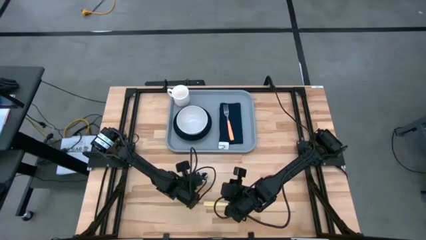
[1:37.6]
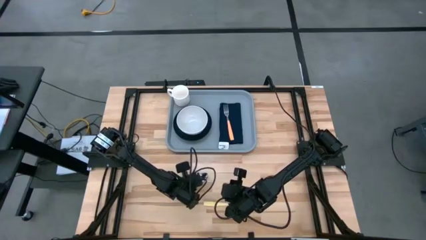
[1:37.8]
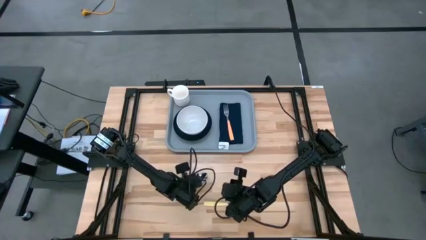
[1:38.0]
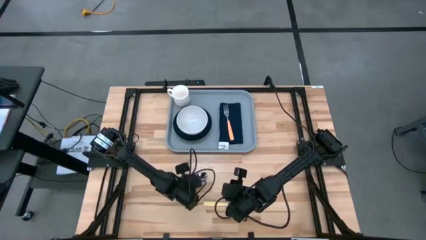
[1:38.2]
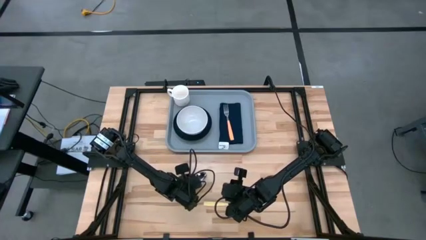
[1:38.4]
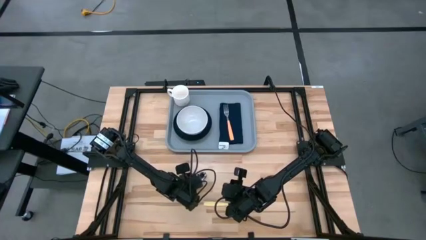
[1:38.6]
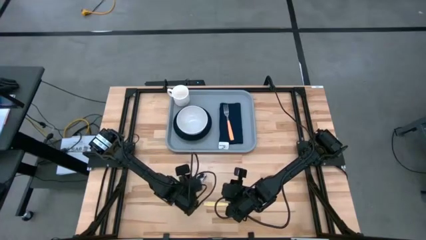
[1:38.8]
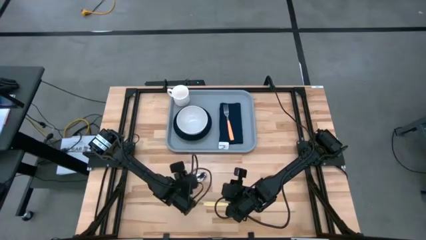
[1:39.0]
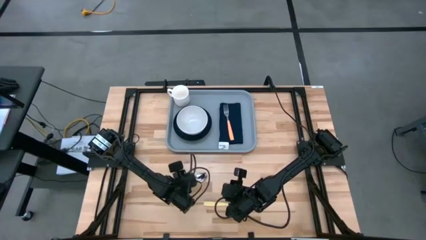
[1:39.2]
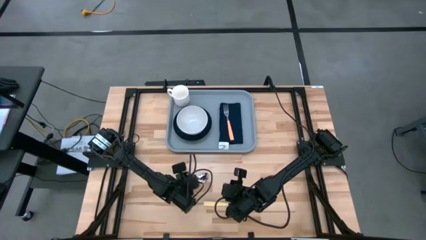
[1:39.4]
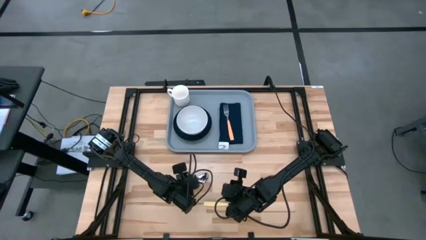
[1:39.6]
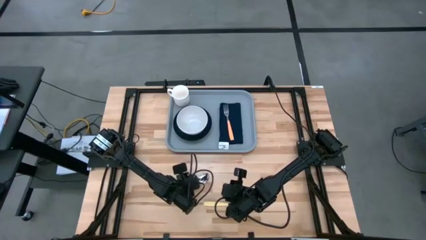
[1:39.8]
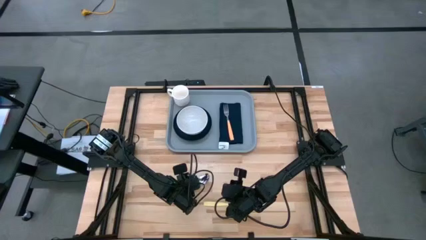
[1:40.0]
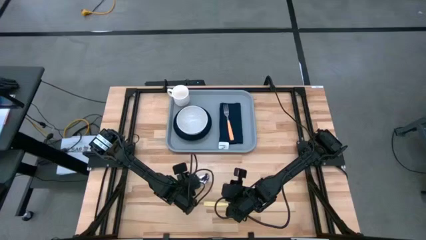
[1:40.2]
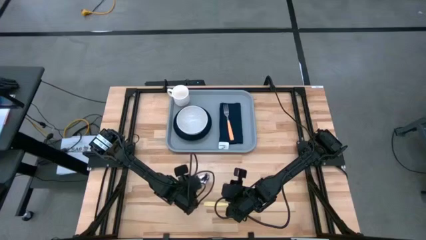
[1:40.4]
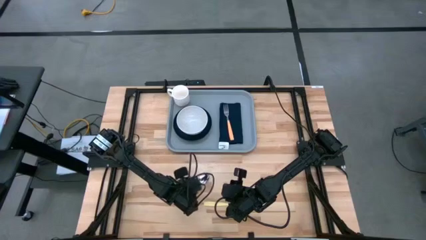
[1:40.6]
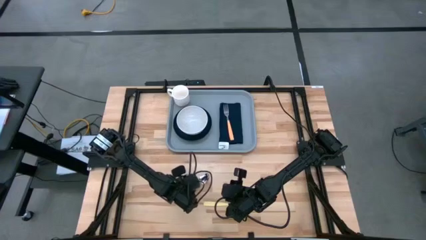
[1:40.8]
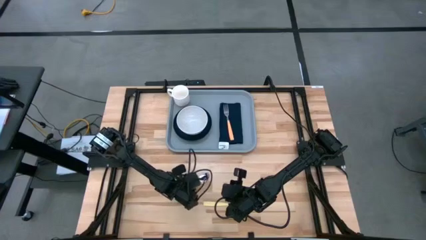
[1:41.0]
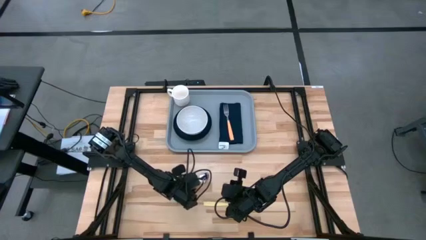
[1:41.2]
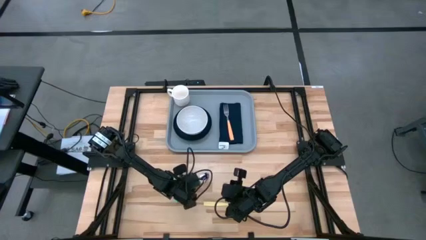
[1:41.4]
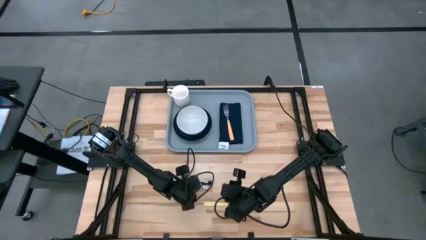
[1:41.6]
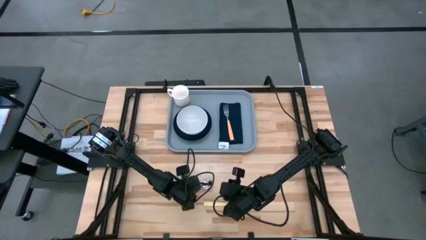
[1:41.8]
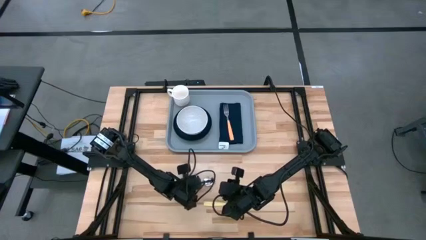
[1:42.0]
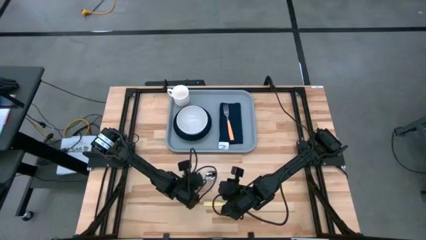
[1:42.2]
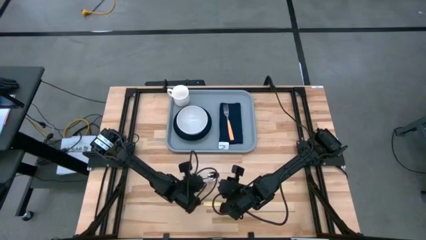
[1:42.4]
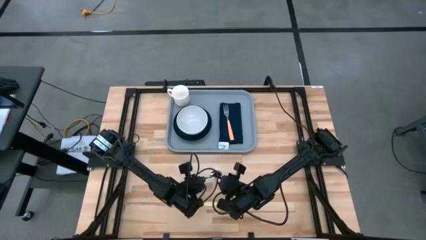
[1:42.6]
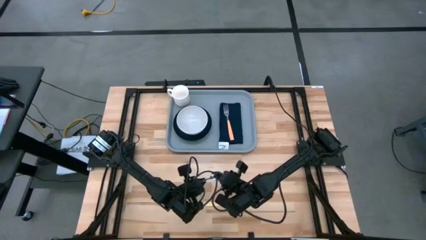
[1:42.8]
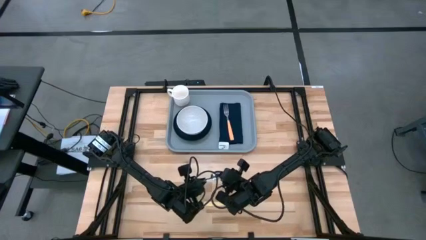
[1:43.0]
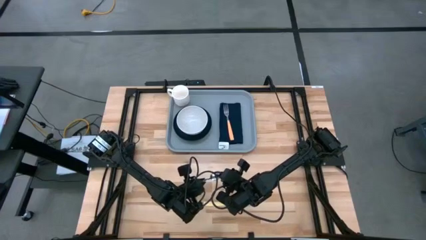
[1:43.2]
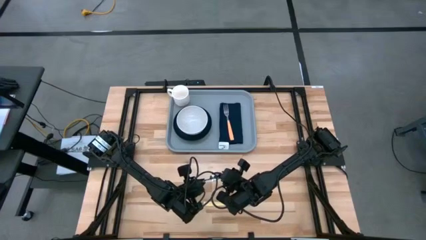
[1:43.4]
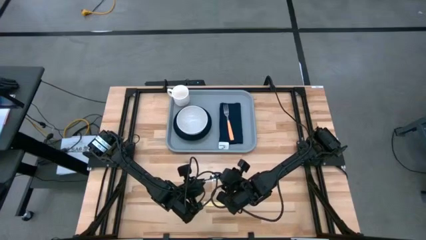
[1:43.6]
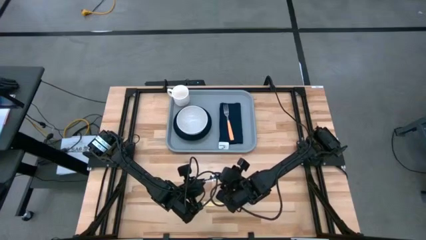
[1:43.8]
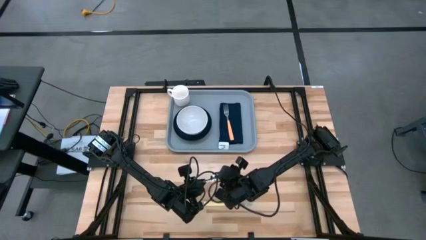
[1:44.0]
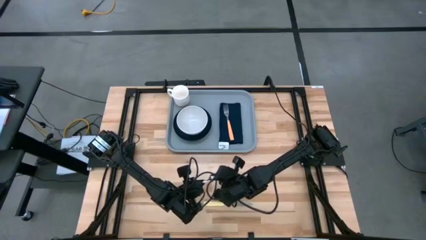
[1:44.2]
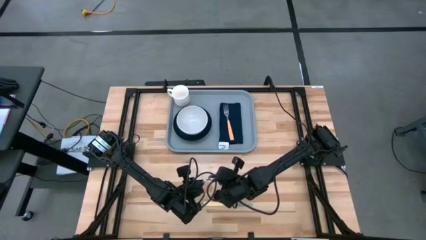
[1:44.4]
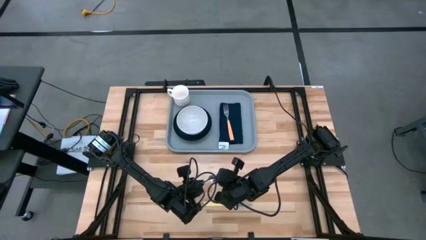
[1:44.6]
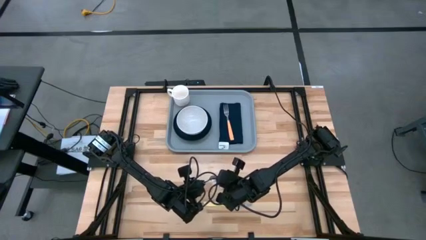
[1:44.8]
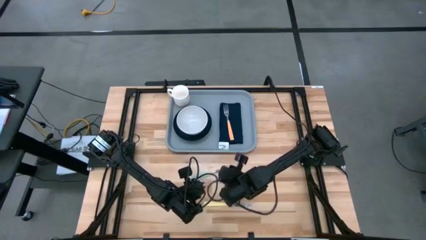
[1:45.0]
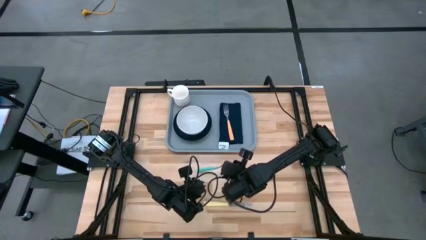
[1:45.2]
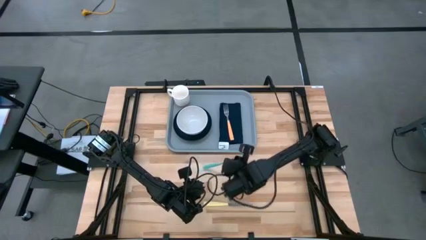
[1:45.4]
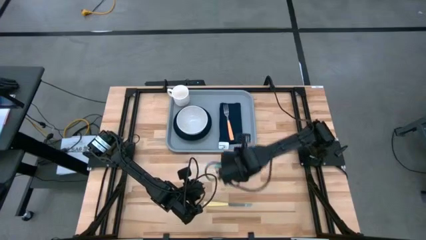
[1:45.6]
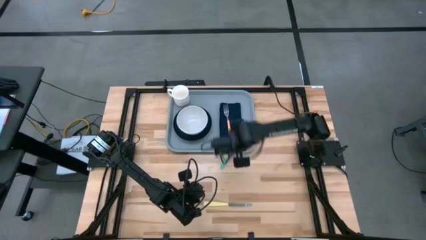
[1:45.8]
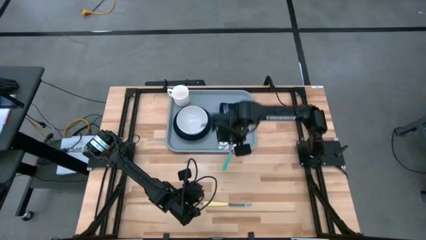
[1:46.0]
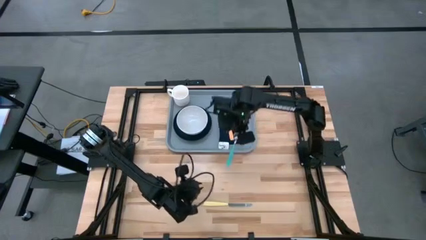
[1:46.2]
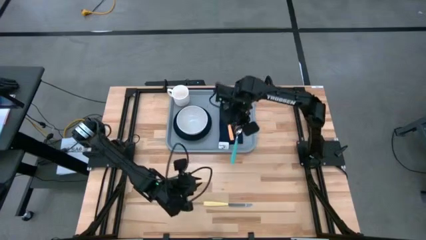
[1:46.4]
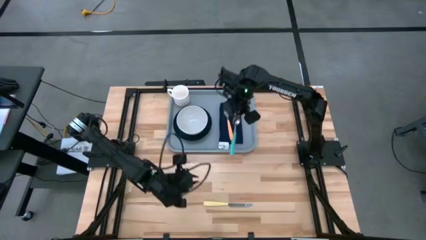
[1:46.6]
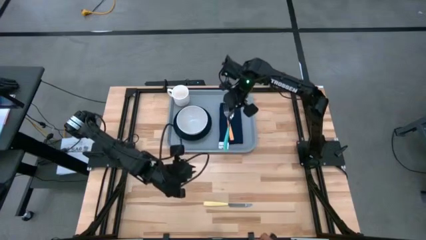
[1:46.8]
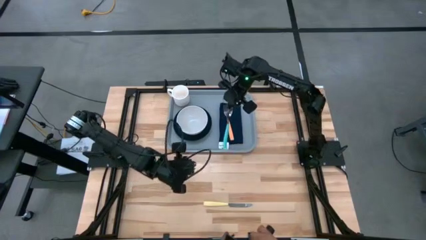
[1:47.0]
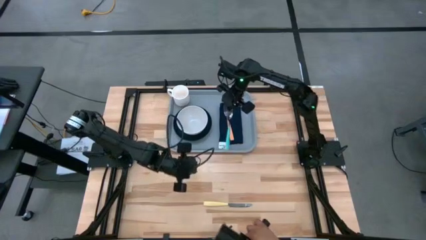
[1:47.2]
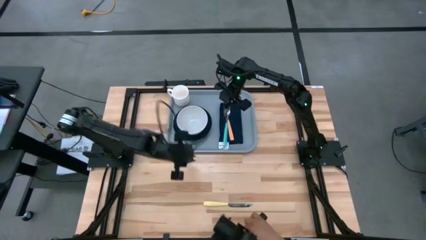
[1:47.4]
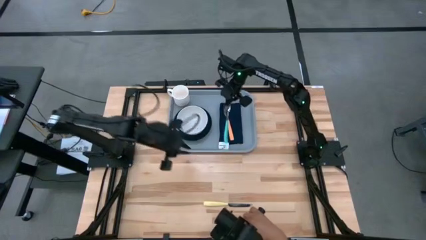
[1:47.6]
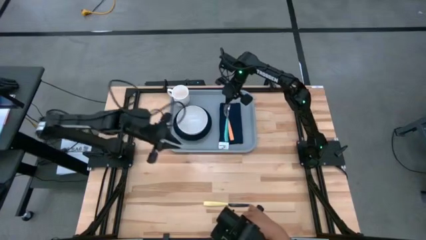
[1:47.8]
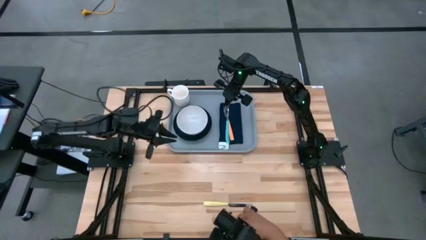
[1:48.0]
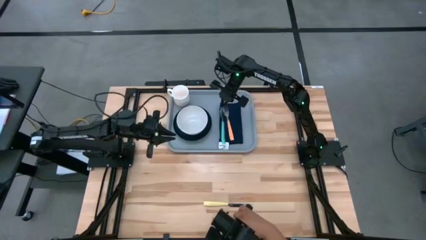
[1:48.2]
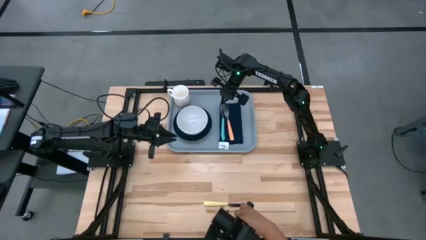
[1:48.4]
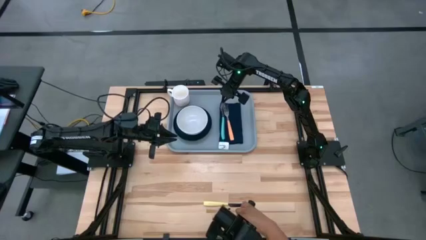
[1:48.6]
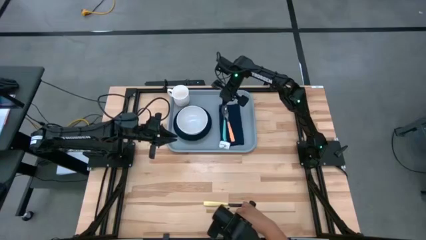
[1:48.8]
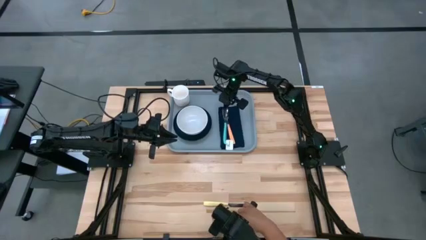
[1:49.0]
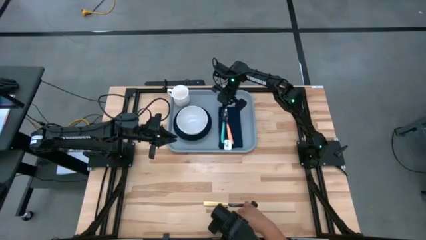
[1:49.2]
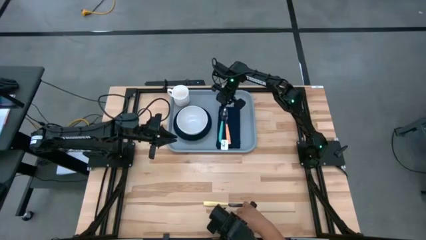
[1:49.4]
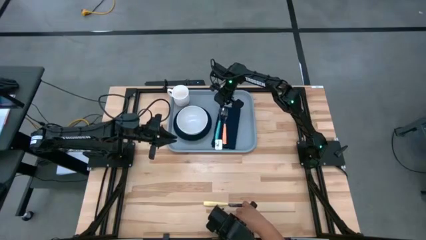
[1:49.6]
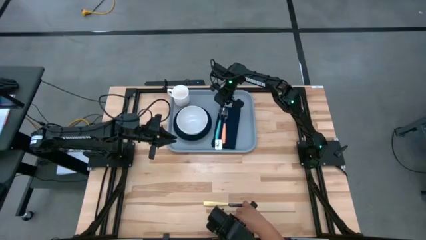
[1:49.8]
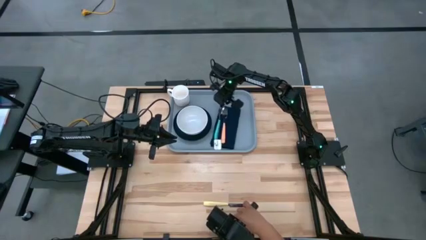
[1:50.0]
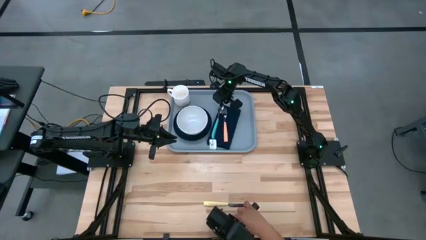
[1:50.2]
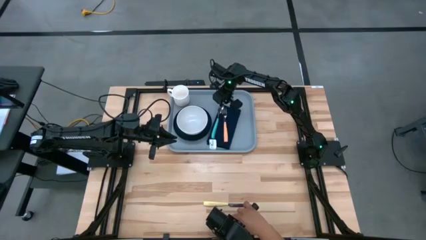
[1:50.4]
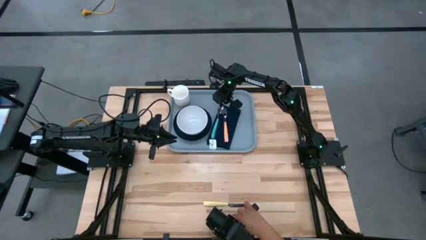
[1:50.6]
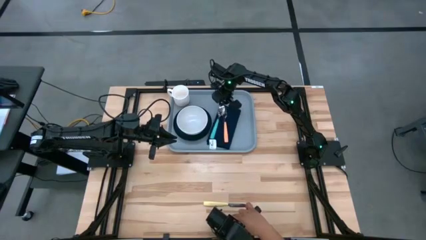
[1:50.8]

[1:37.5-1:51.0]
Task: Set up tray
Put the blue spoon on the blue napkin to the left of the orange fork

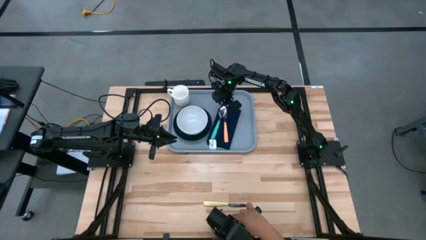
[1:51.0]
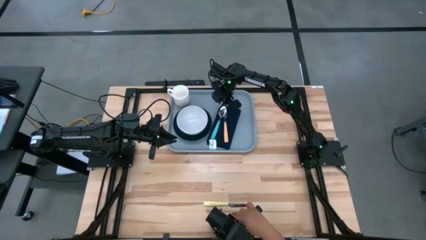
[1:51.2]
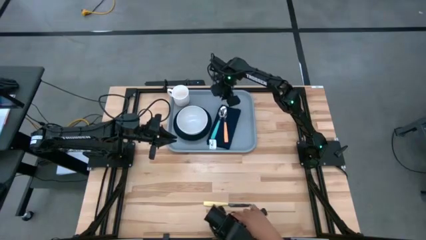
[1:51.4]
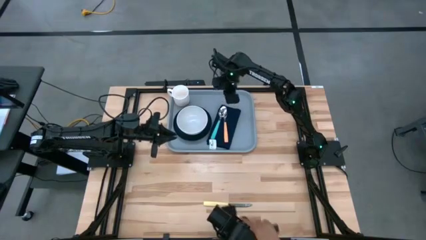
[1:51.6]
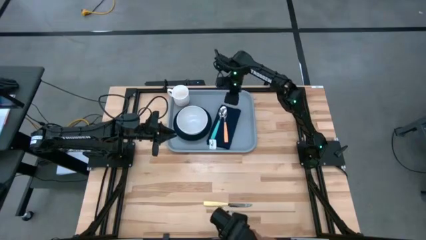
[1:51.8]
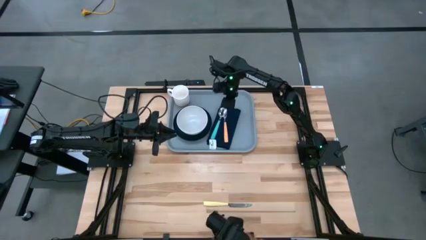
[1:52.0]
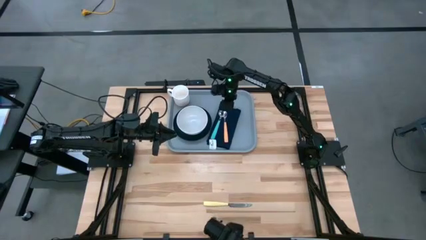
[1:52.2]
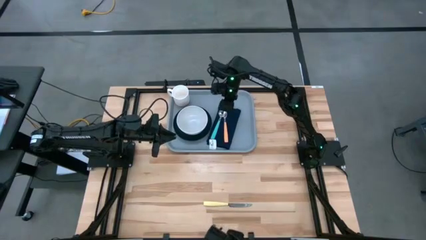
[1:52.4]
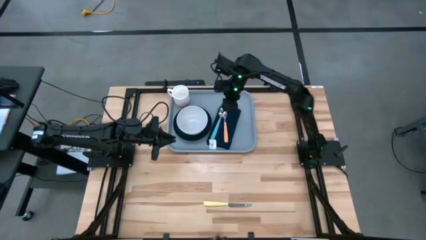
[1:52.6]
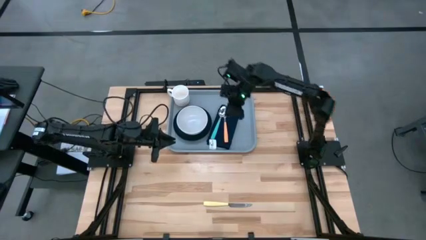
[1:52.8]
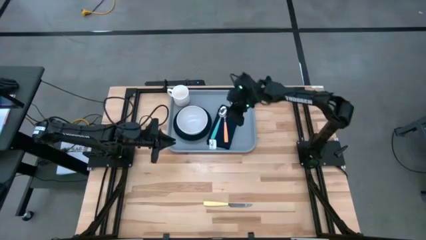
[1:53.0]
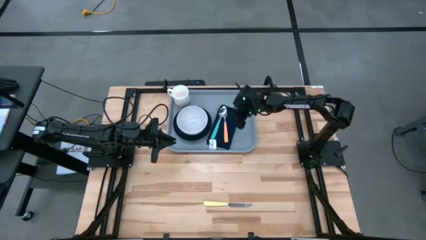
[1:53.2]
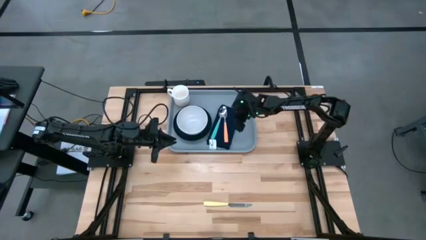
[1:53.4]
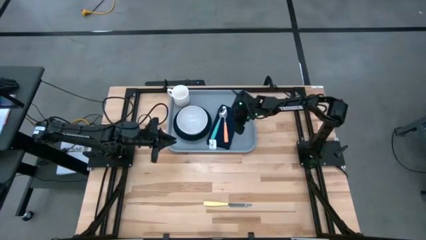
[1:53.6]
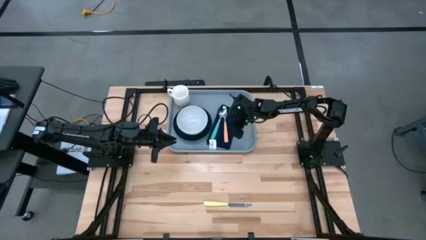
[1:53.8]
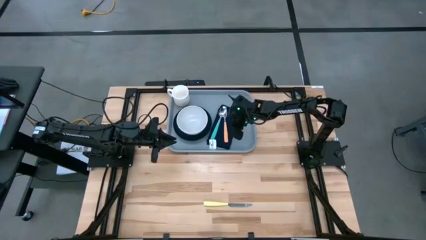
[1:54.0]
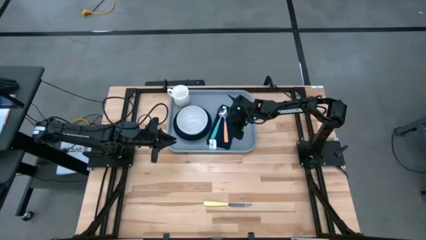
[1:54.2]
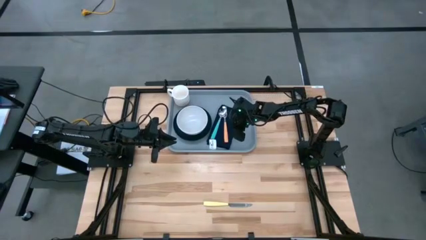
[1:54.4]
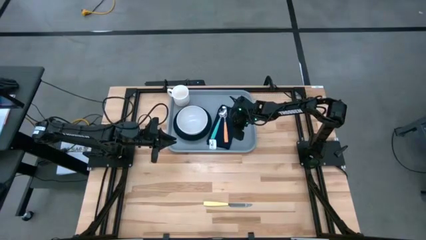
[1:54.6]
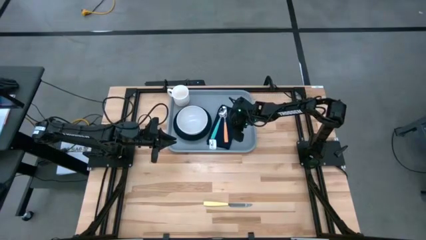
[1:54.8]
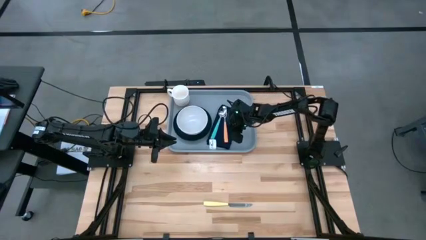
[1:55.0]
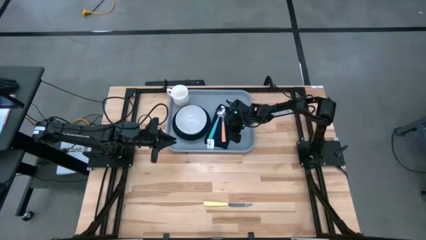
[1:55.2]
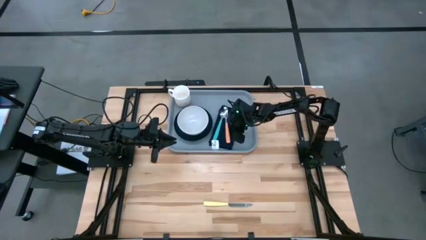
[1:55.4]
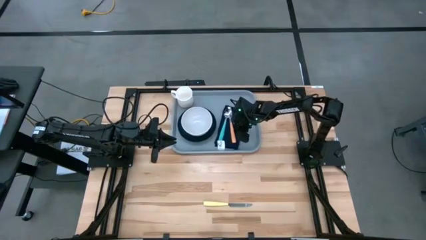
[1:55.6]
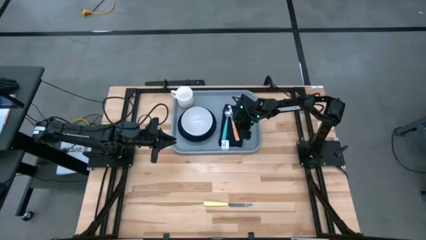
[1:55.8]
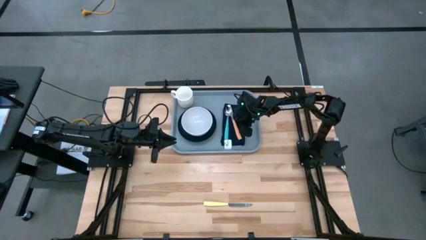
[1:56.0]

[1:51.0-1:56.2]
Adjust the blue napkin
